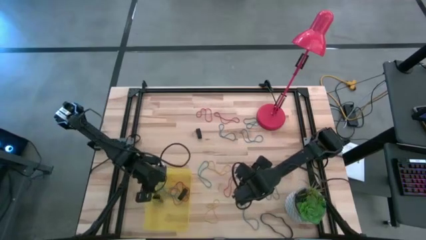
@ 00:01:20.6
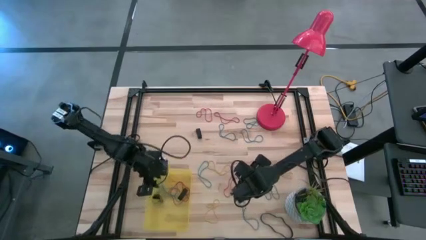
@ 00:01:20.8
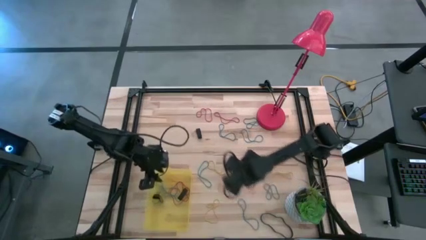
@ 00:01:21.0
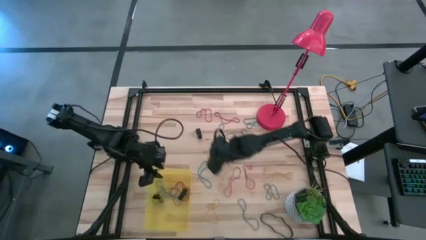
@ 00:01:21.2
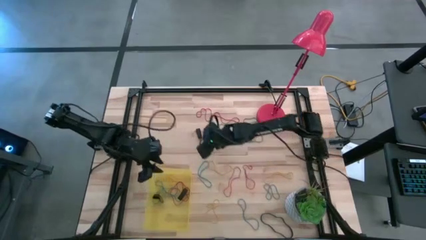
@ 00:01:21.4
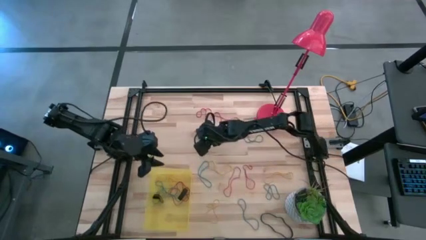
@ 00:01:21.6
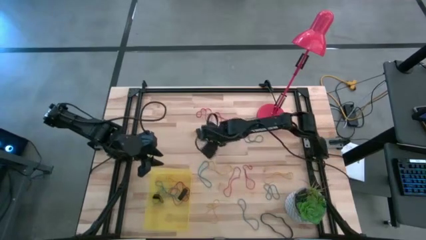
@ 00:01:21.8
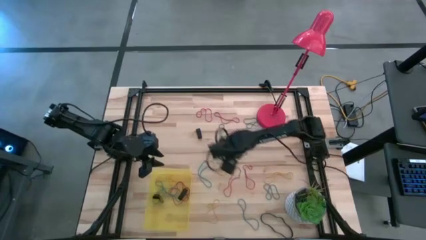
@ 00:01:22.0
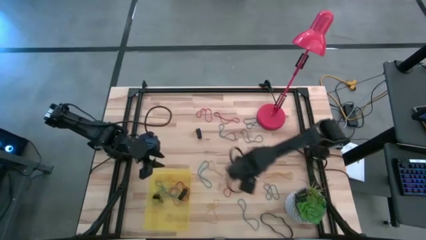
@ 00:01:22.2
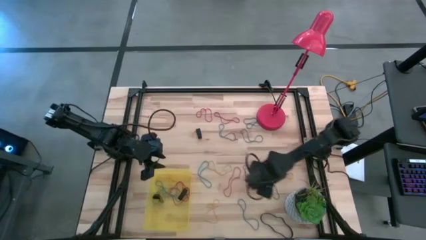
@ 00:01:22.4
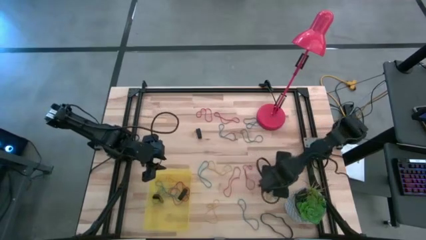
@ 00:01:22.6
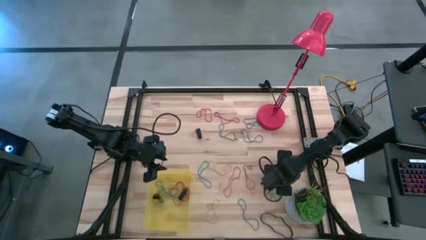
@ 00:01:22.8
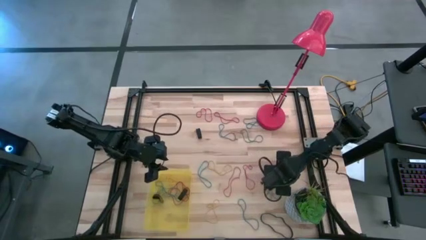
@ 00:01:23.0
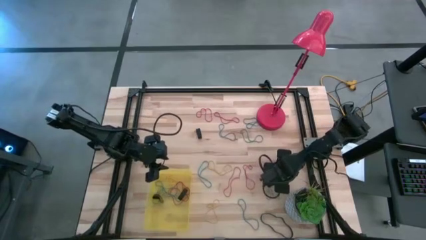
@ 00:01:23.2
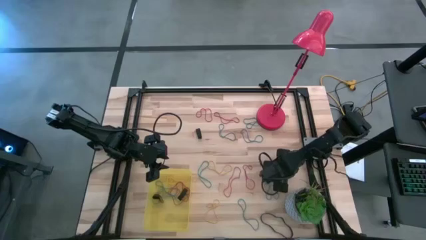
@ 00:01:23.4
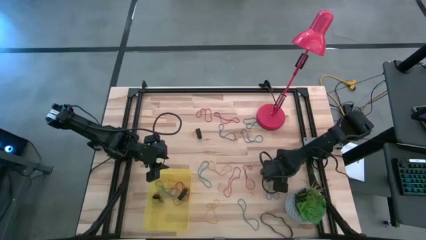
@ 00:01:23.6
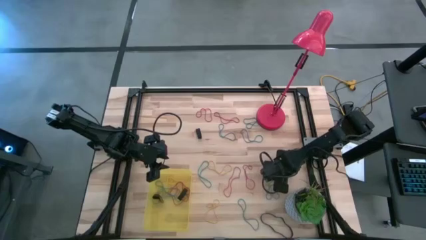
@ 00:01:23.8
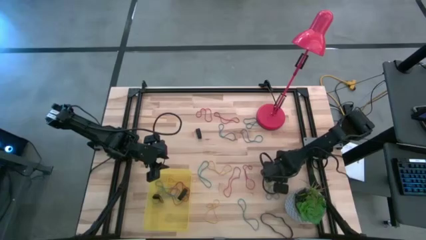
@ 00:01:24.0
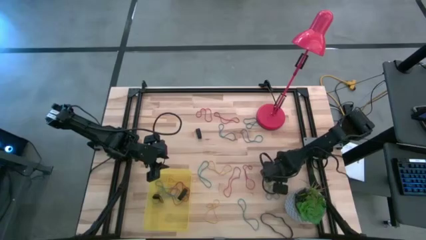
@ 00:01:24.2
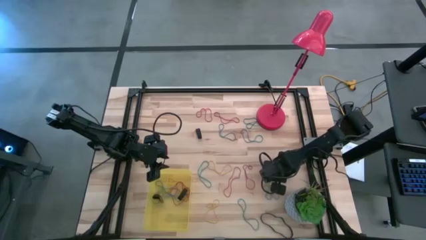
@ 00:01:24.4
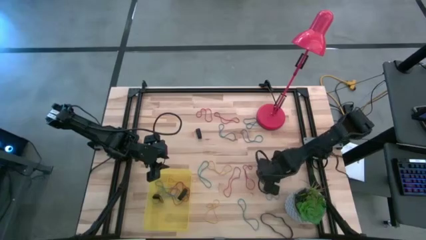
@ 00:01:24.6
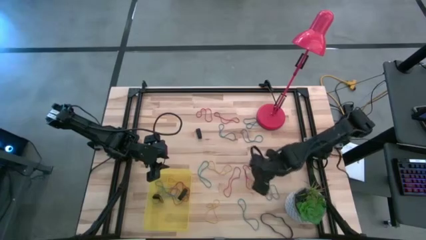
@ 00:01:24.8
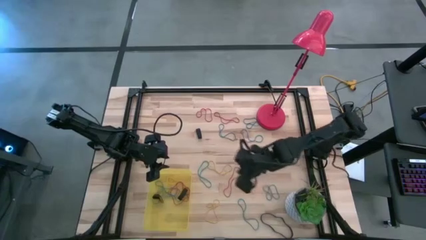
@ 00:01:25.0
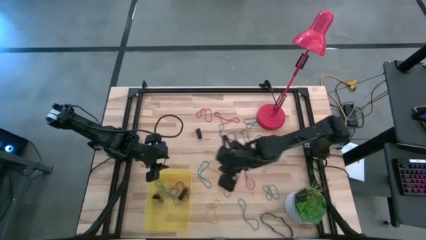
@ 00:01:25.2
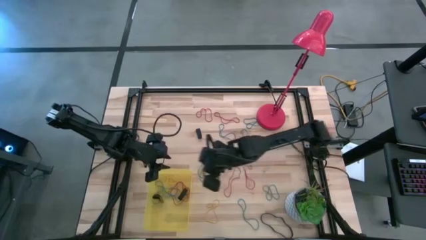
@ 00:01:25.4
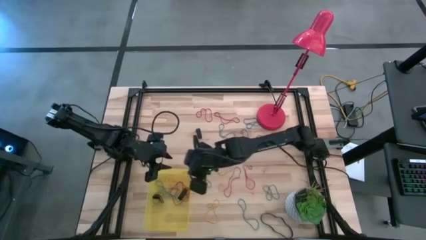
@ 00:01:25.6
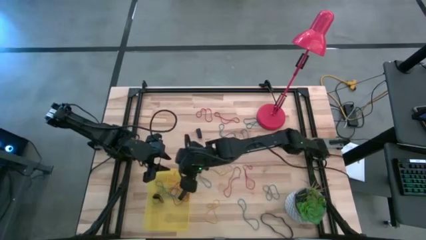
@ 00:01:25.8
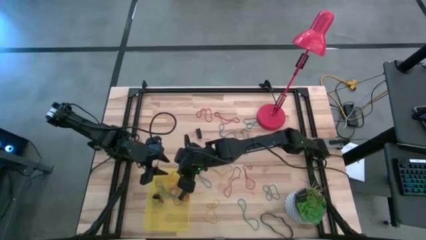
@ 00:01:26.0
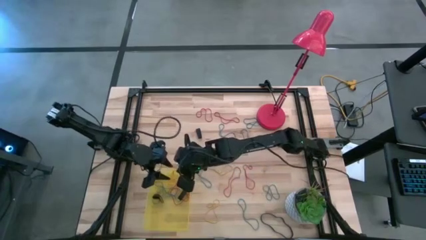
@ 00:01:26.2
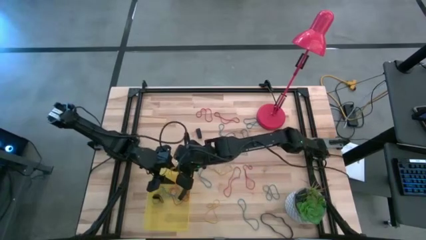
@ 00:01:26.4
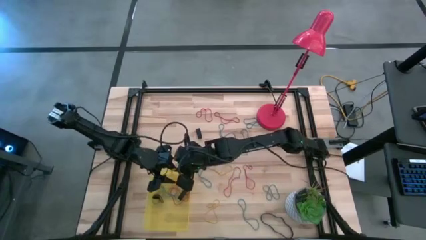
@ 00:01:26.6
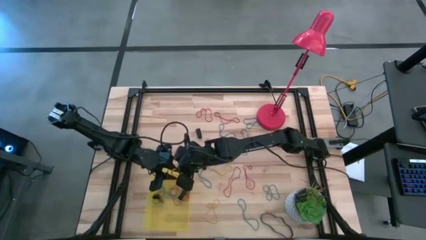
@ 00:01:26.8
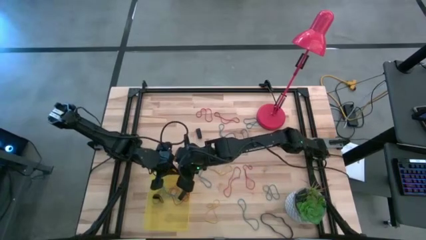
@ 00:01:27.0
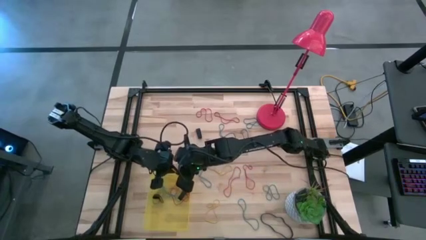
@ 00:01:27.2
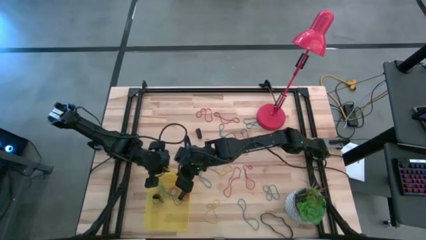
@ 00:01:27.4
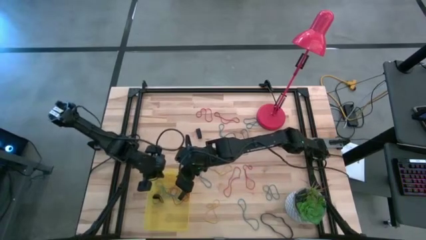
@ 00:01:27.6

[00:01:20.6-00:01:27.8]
Task: Pick and place rubber bands into bin
Put the yellow rubber band into the bin

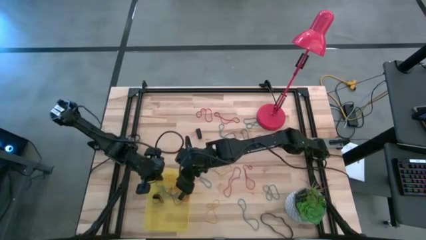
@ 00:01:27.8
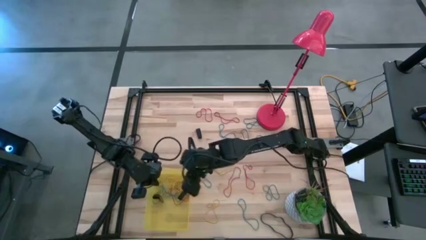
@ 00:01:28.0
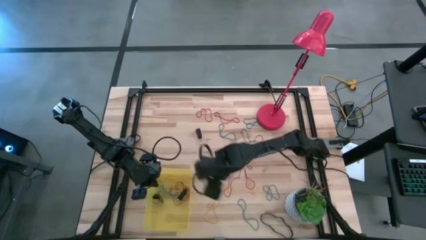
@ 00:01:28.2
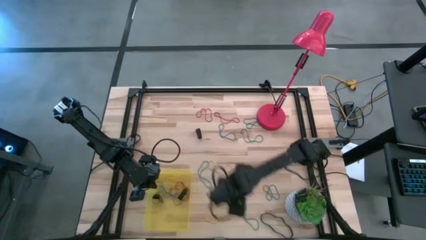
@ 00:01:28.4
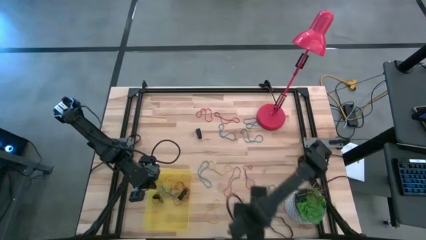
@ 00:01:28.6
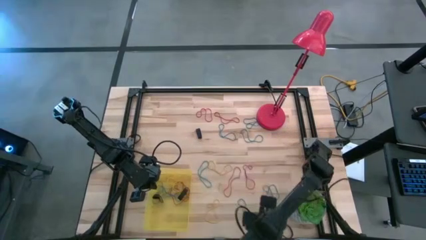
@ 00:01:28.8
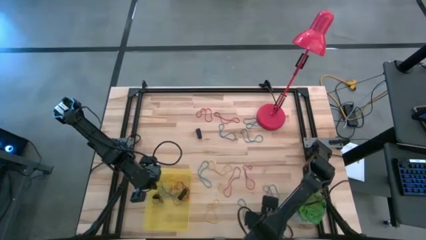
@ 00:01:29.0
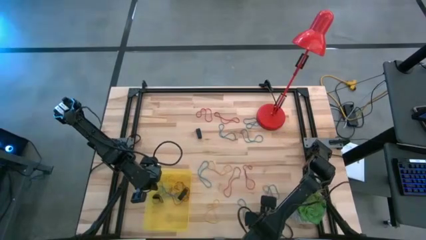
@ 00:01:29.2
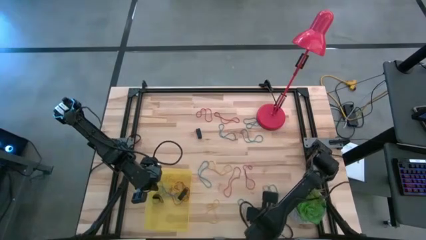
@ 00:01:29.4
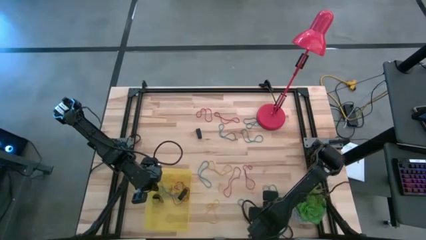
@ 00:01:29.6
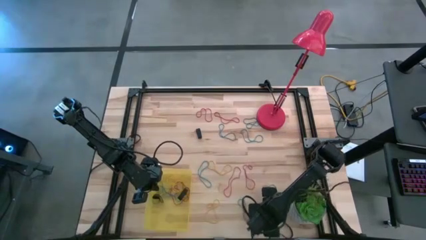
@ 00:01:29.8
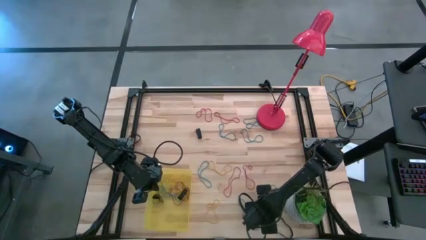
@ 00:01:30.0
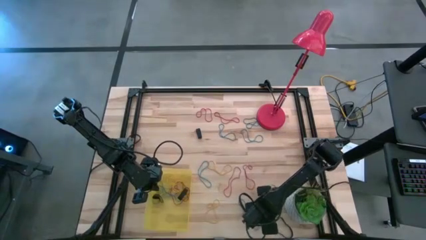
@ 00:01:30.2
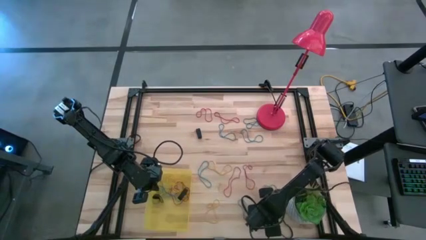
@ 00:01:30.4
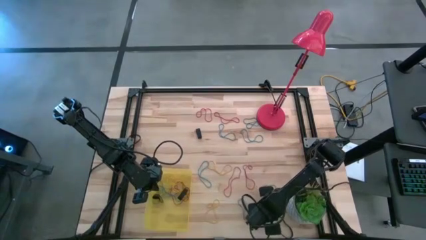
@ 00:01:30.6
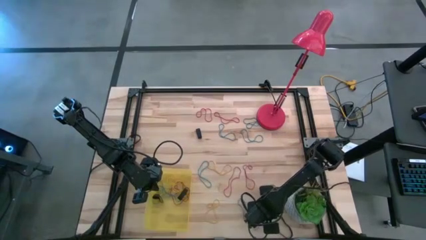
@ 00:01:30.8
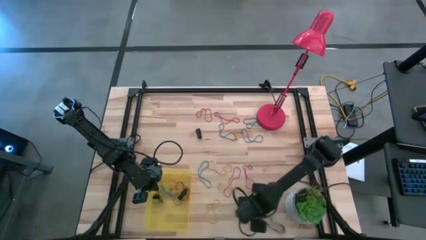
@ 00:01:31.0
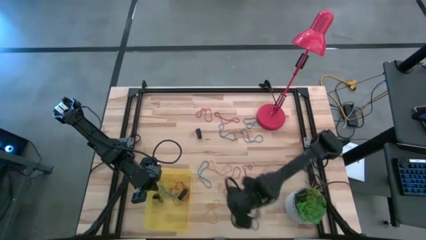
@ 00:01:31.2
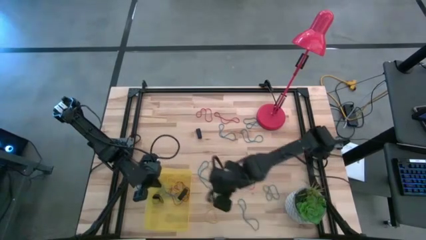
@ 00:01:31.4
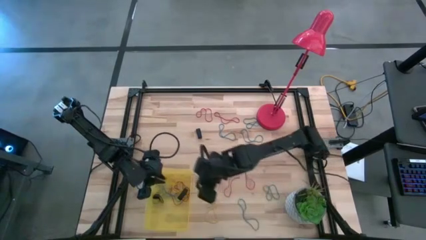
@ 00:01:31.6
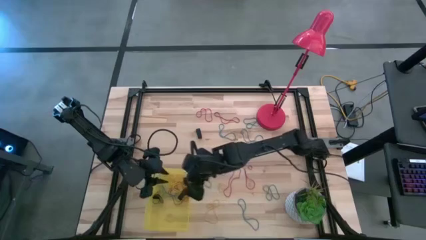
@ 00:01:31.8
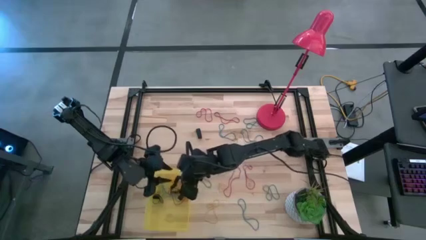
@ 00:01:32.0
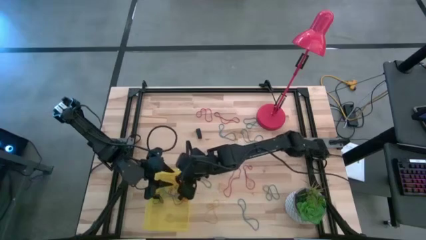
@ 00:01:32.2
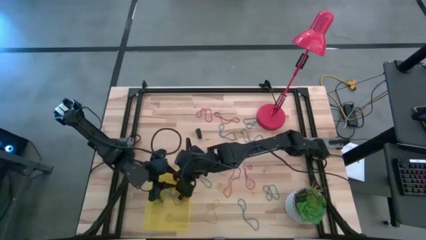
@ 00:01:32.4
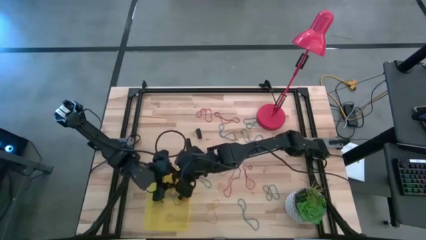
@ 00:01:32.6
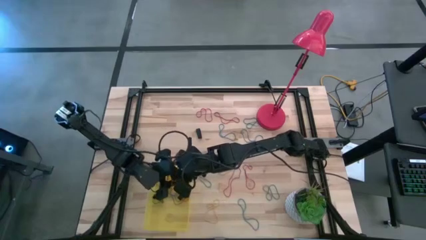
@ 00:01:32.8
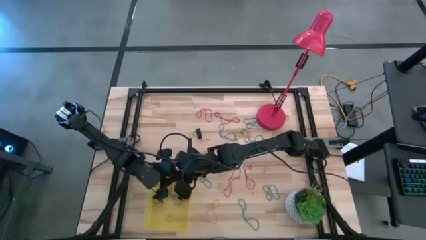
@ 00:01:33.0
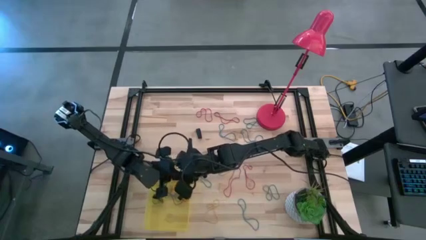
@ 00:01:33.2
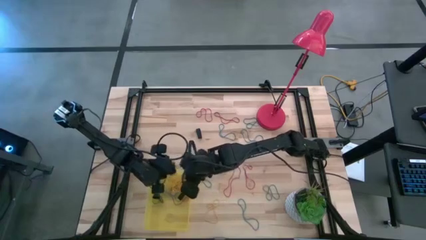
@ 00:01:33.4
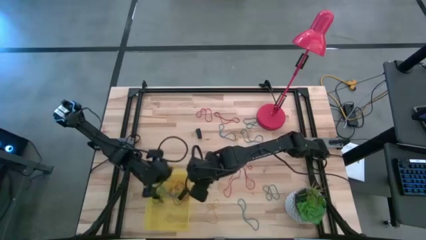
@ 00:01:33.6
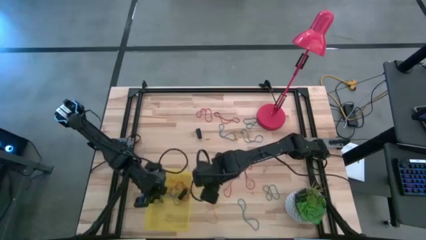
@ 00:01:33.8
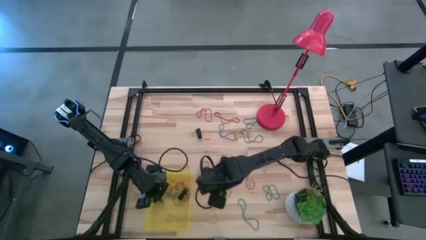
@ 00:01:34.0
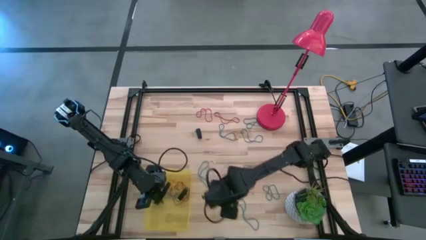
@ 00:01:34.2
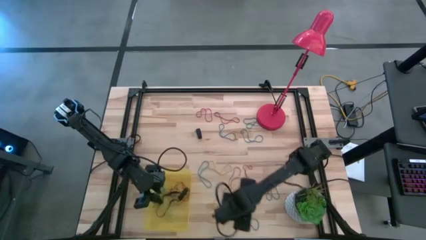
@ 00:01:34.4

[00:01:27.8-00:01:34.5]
Put the black rubber band into the bin

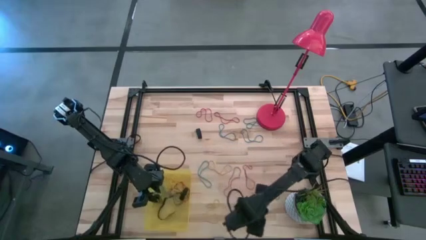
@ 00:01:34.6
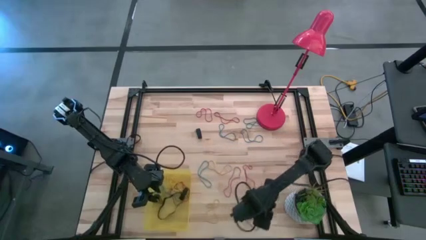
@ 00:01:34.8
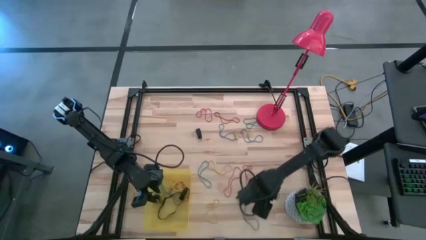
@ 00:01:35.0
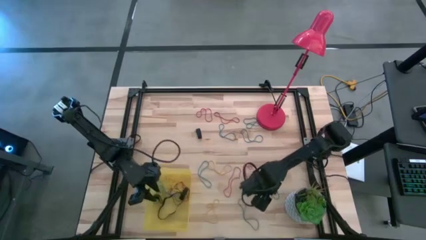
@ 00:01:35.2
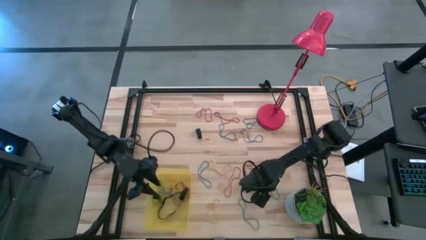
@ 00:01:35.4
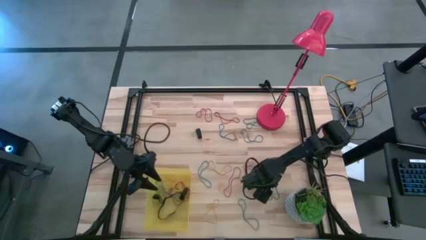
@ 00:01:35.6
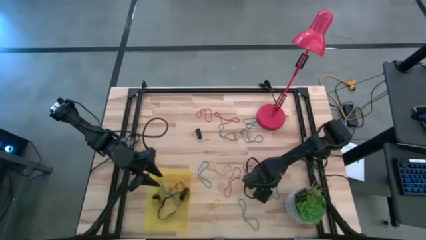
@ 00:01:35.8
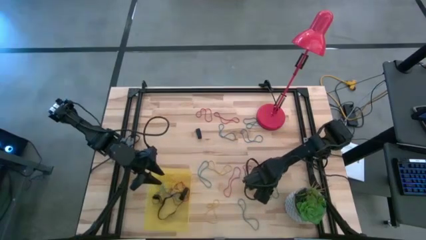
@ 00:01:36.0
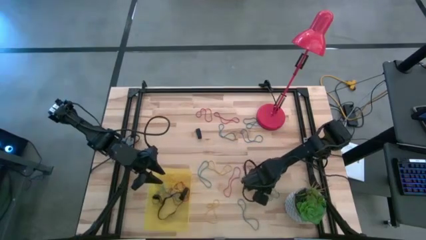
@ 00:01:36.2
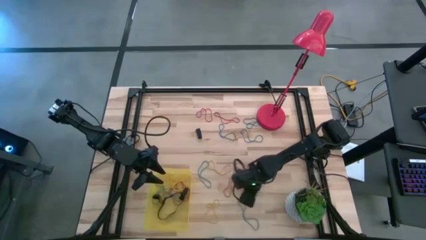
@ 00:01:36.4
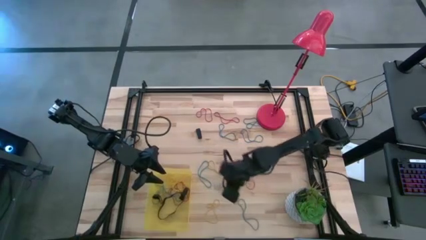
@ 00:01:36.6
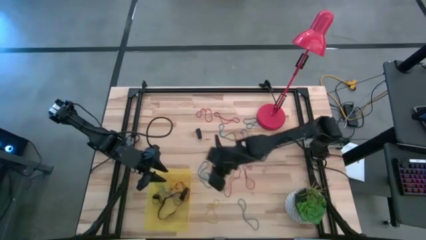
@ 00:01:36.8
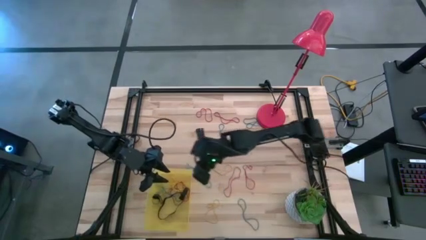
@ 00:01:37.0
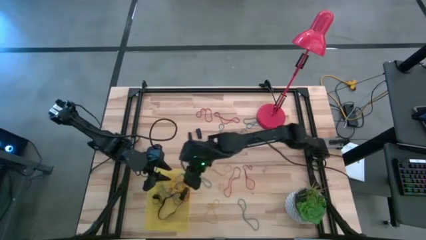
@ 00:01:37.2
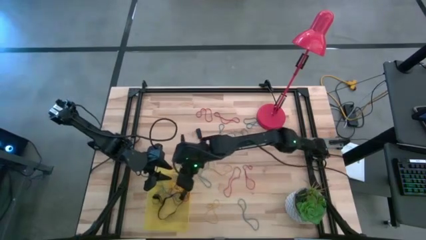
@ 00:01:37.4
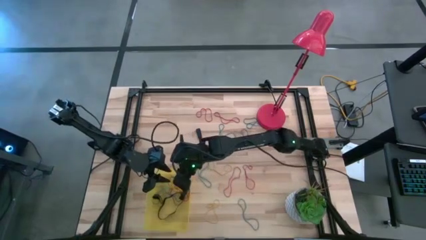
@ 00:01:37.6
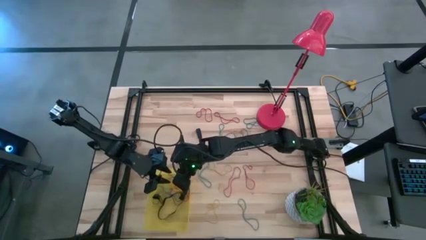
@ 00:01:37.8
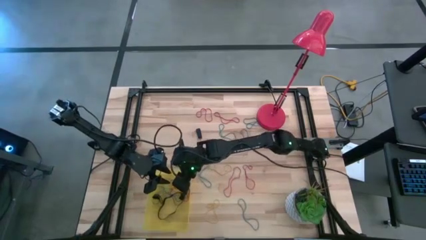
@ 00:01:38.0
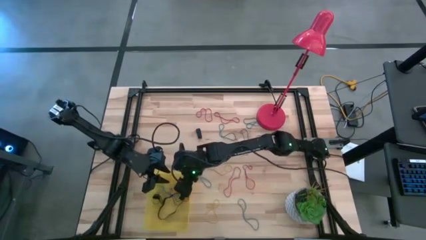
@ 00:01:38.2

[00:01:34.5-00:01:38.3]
Put the blue rubber band into the bin
